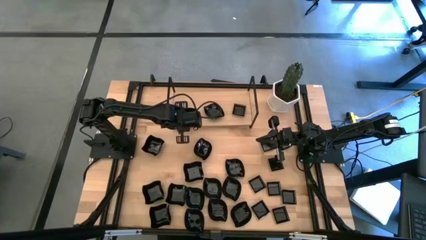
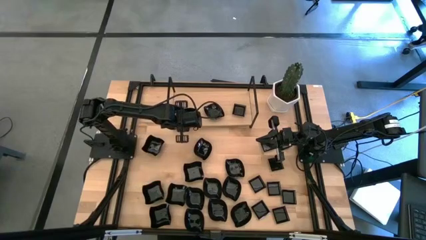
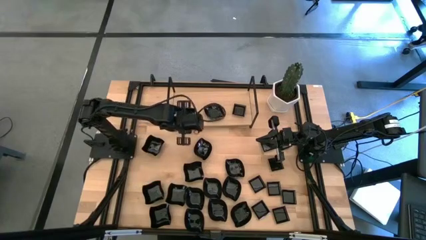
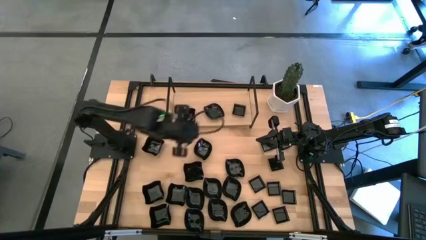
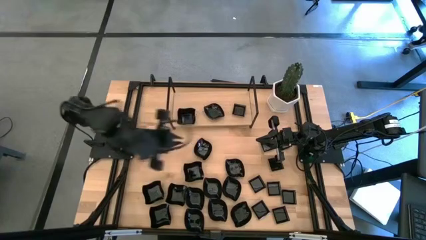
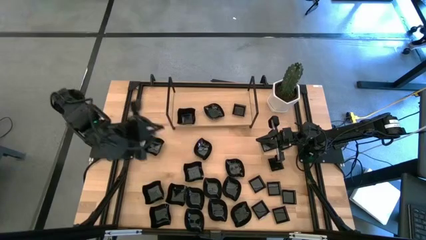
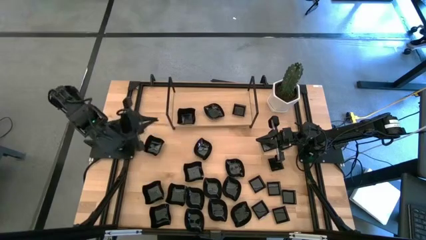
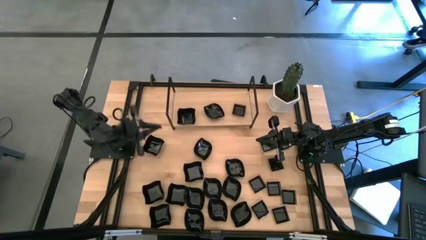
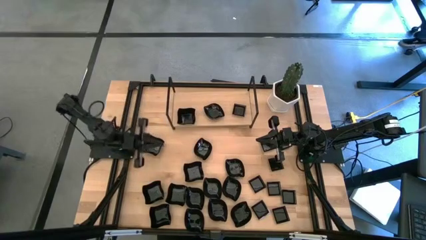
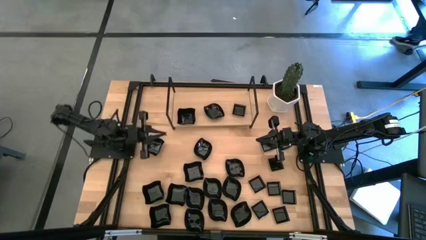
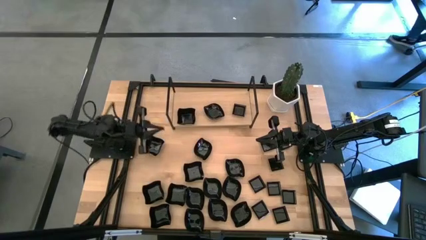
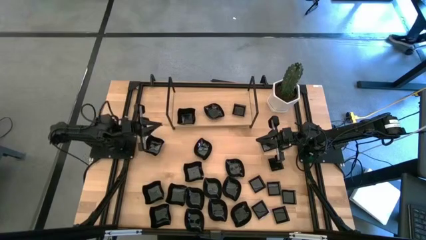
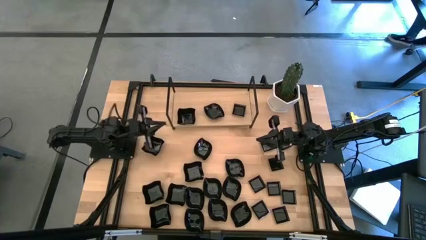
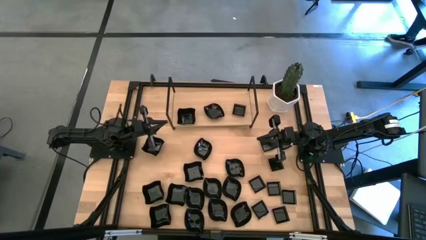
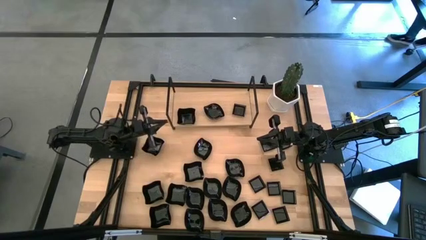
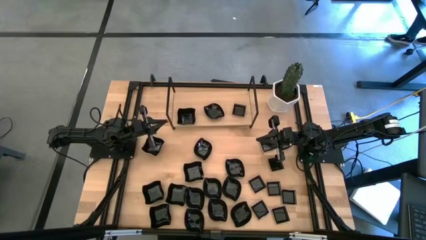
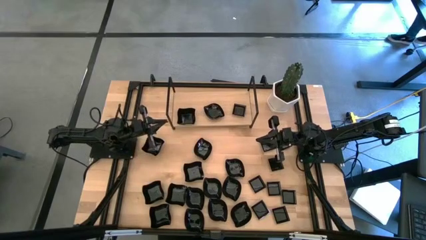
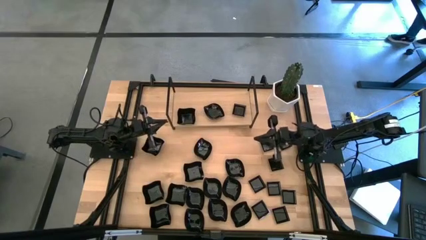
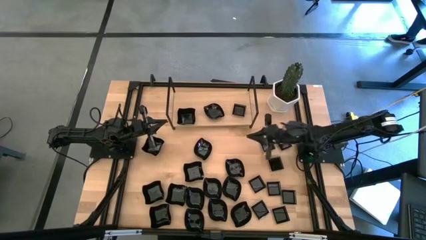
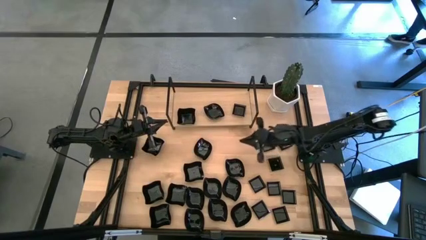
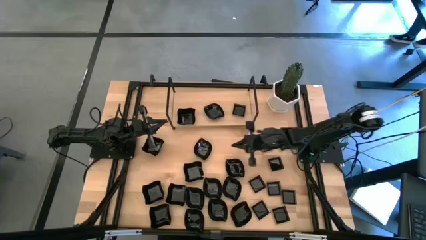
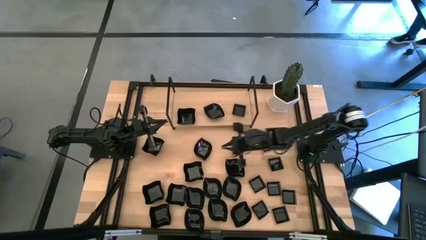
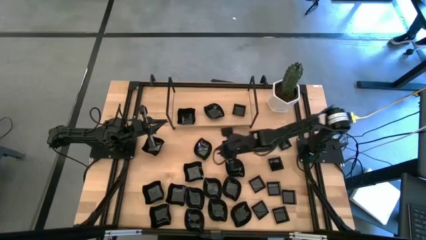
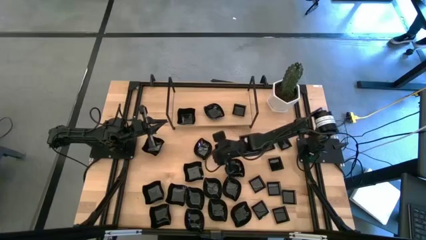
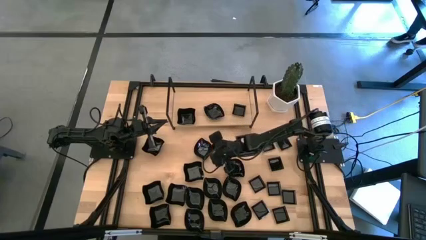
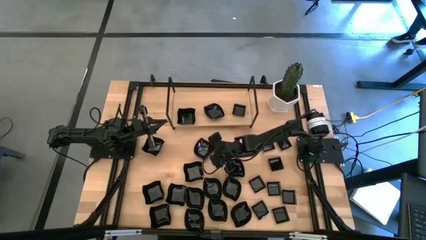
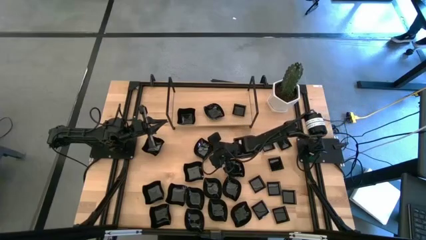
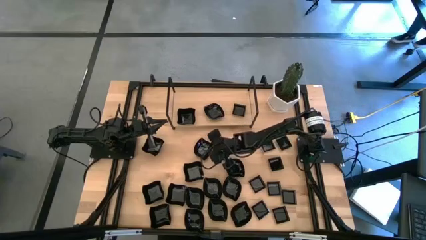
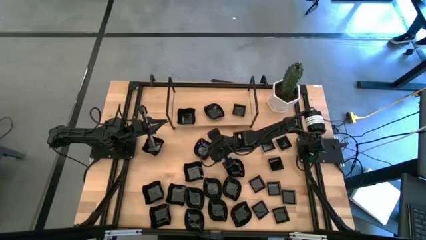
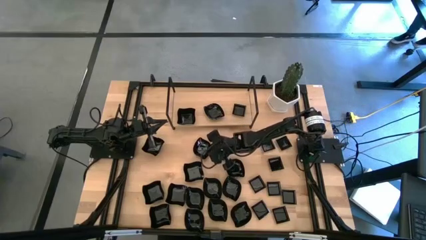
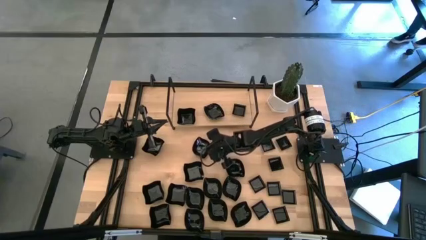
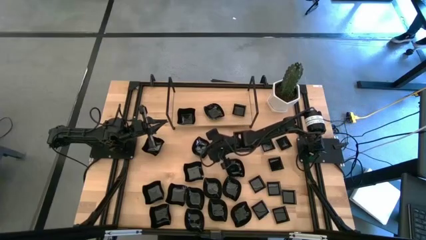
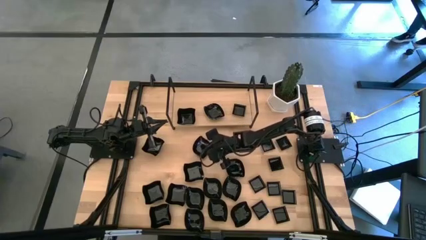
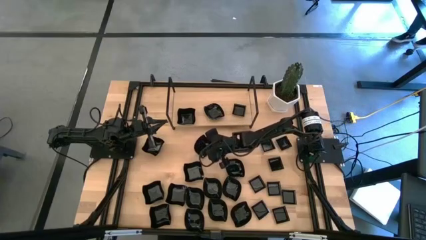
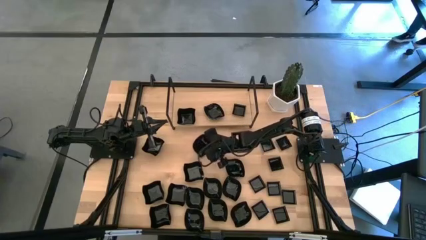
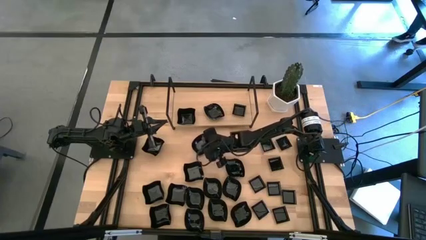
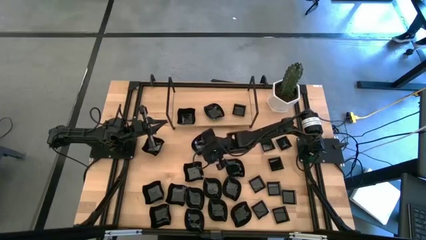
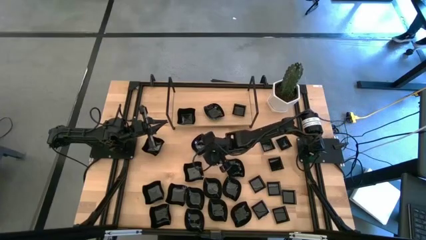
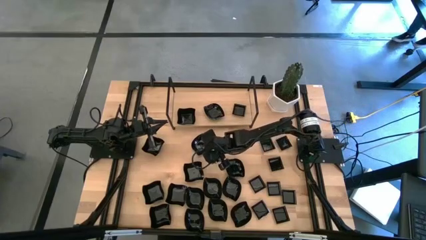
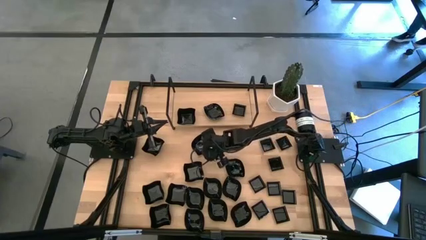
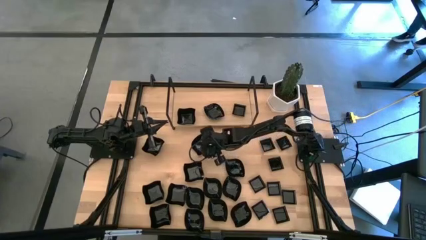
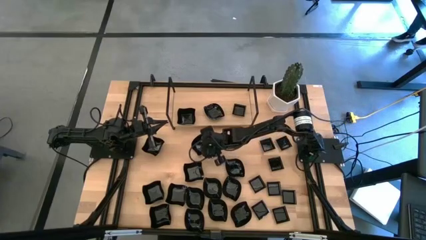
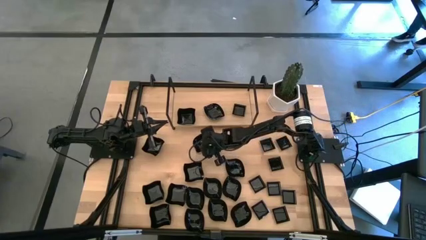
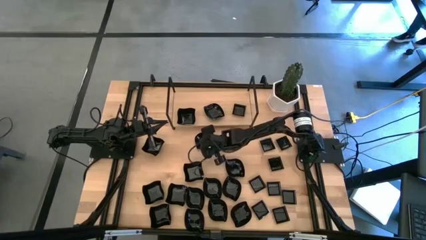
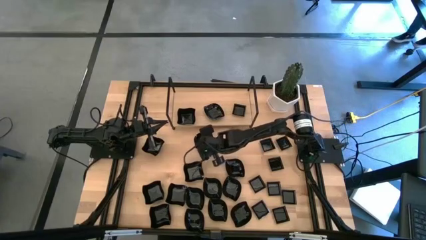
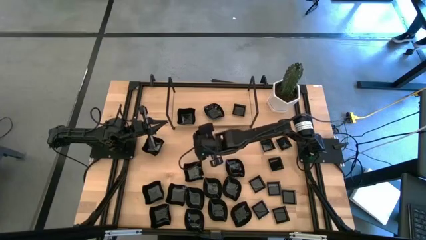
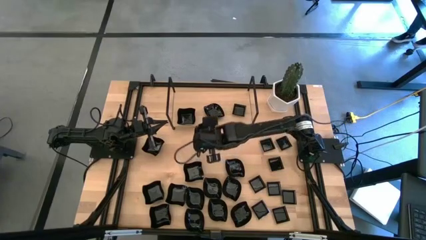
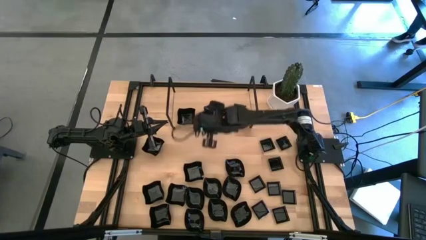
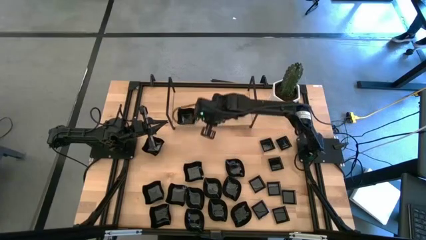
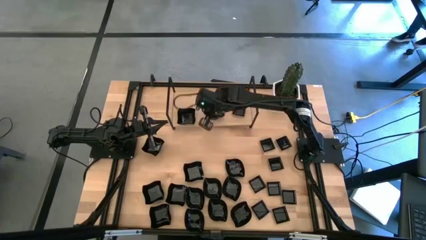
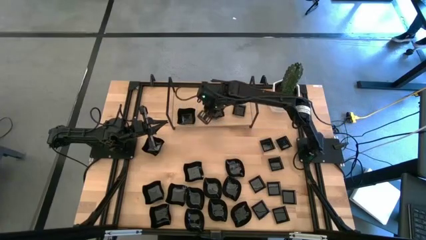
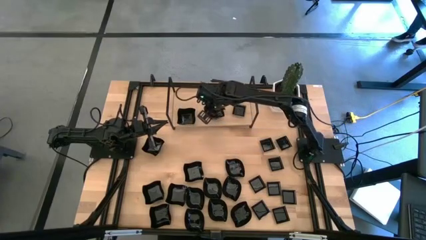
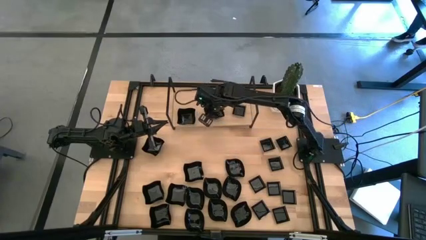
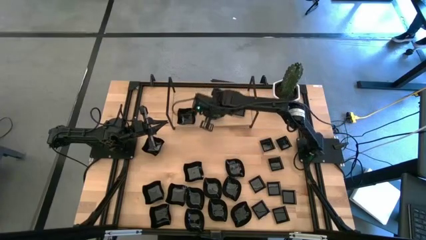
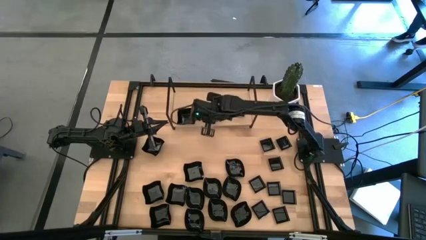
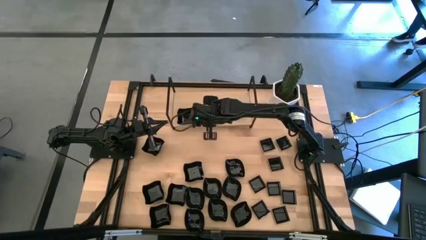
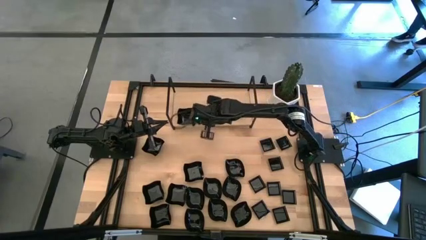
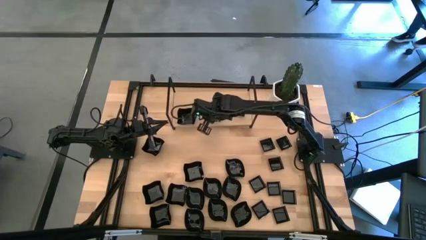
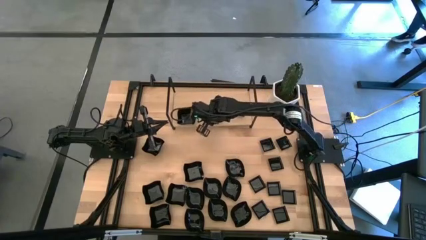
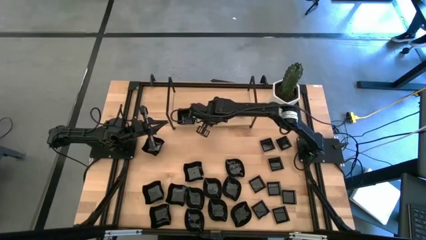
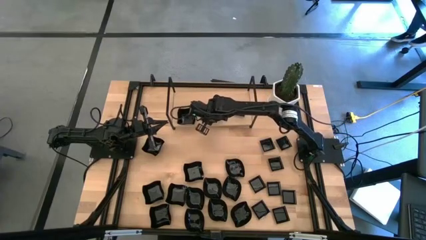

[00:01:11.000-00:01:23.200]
Task: Pick & Place Mini shaped plates
Stack the black leaf-shaped plate on top of the black leaf-shaped plate on the shelf

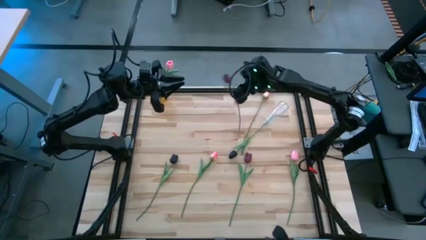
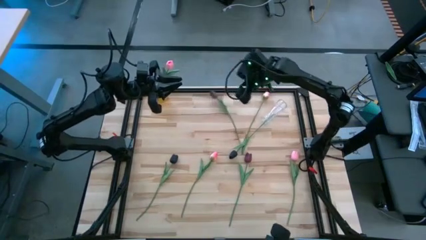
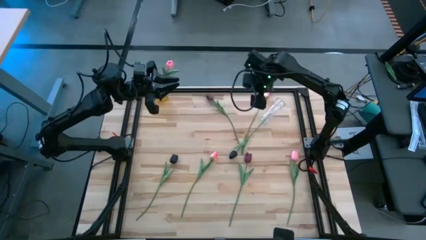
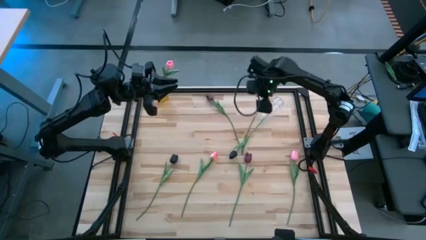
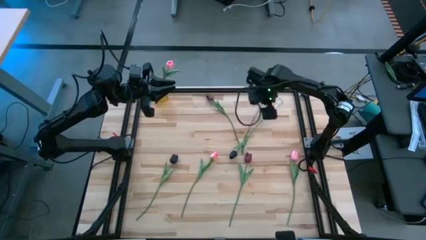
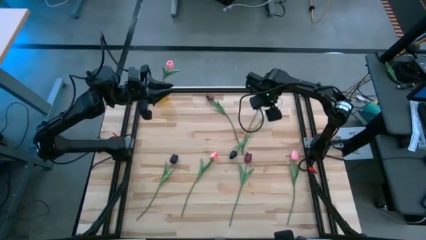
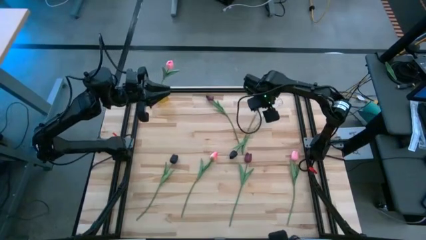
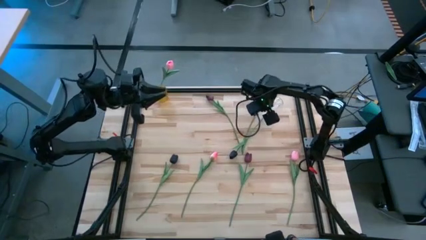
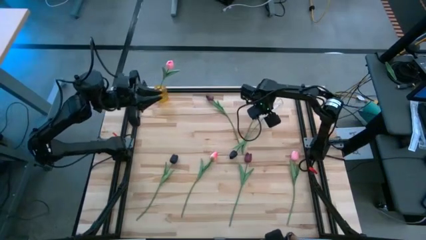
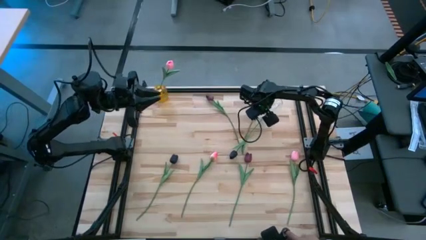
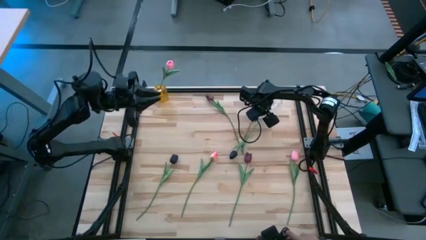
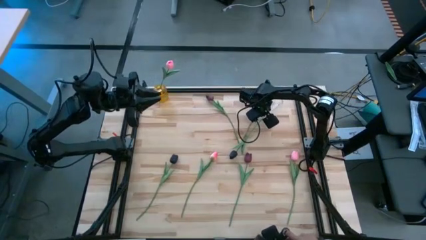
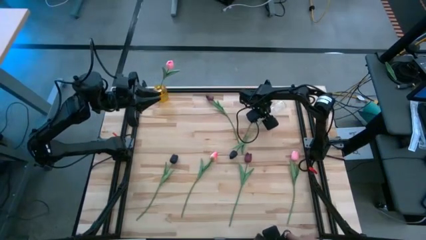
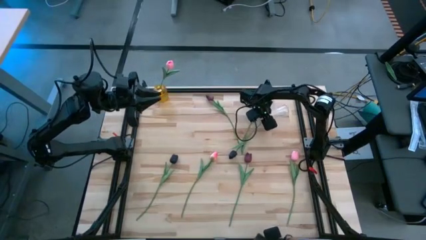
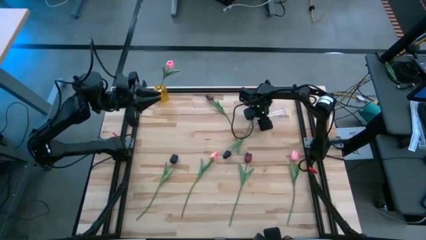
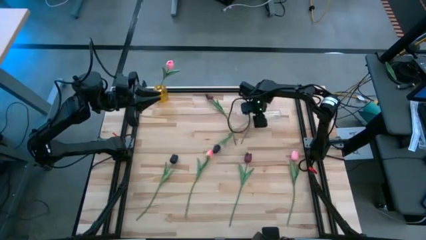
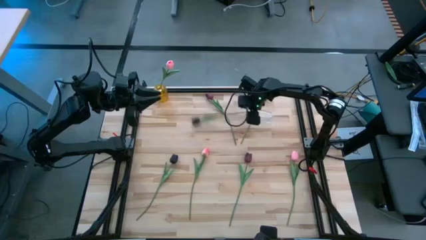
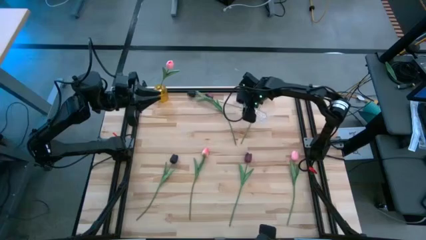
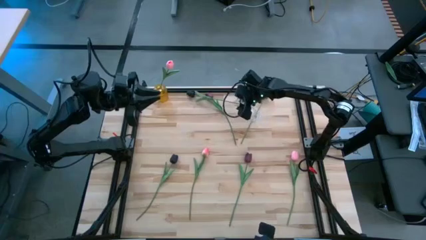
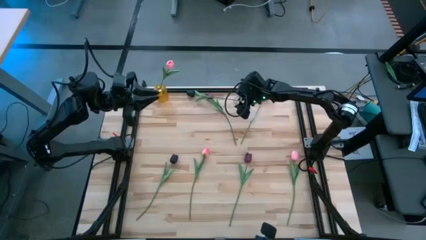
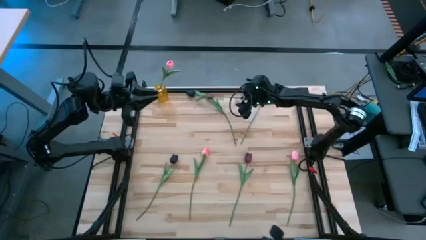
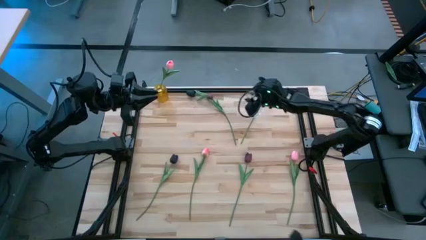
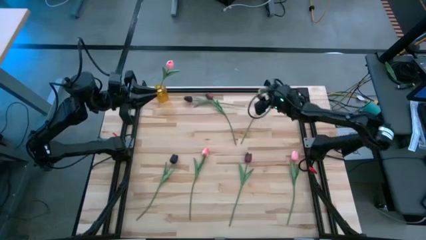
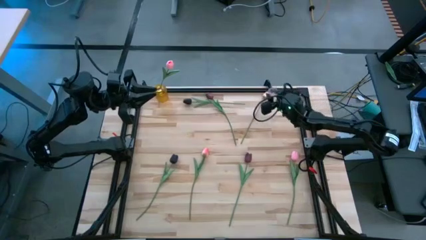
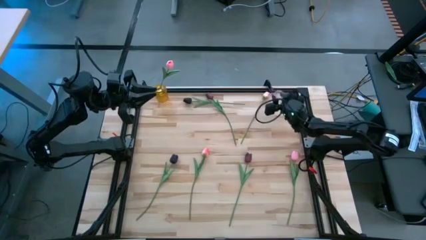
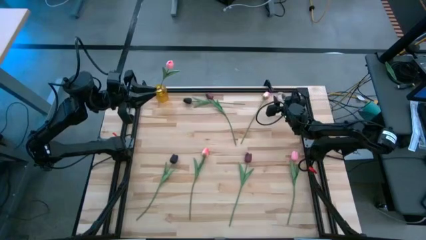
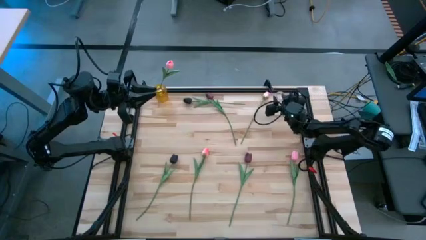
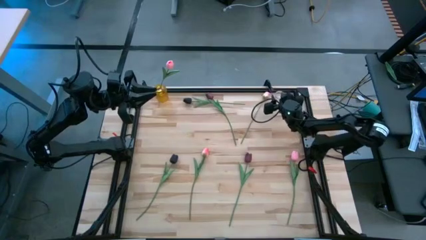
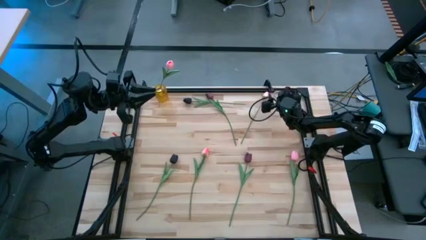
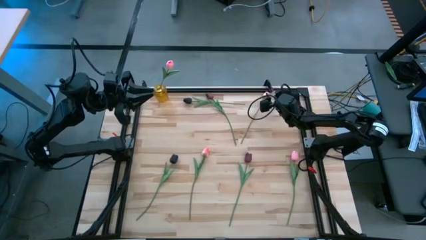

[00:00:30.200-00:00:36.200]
Task: Sort flowers into vase by color
Adjust the transparent vase on the table
